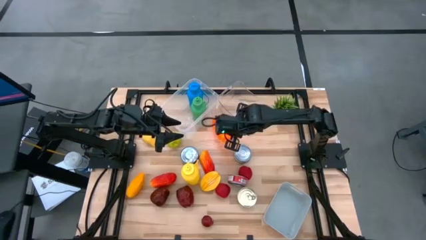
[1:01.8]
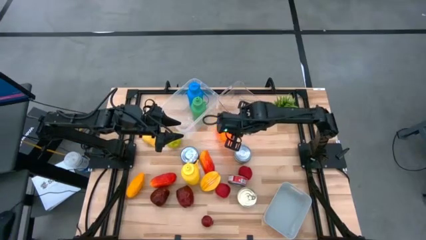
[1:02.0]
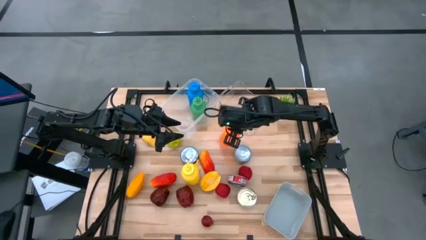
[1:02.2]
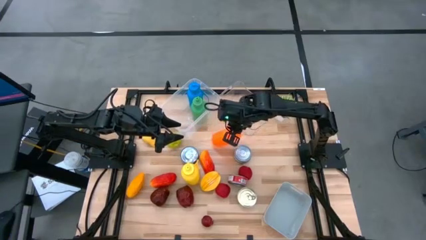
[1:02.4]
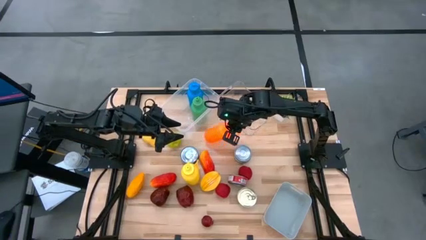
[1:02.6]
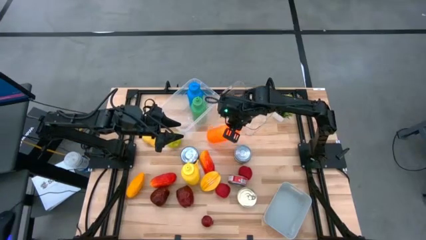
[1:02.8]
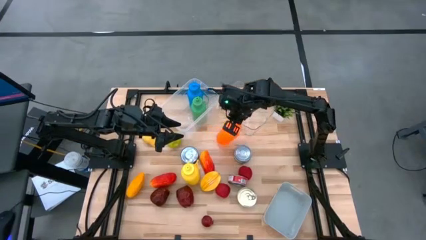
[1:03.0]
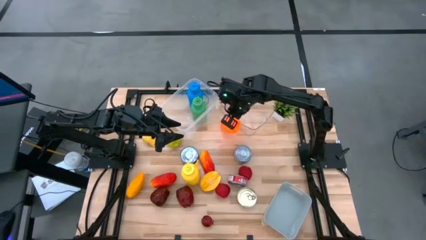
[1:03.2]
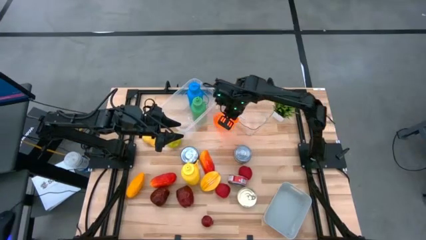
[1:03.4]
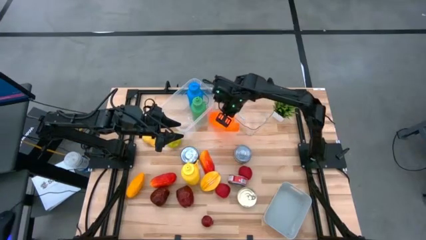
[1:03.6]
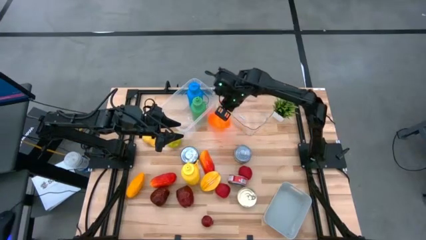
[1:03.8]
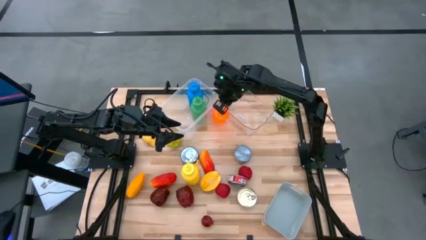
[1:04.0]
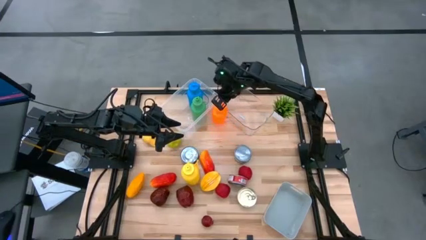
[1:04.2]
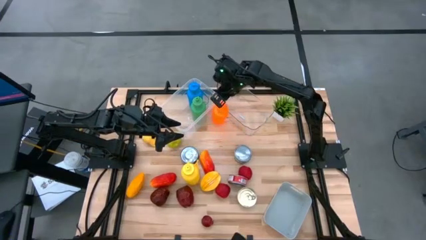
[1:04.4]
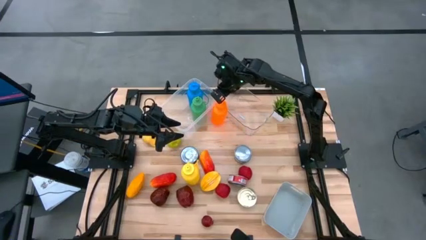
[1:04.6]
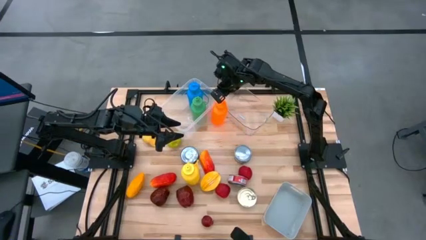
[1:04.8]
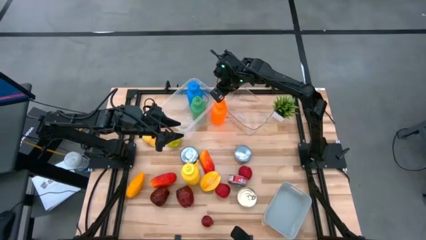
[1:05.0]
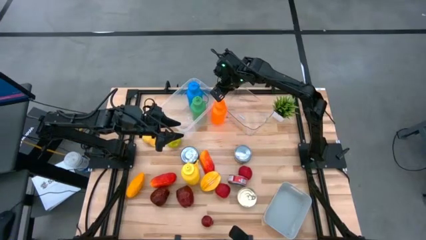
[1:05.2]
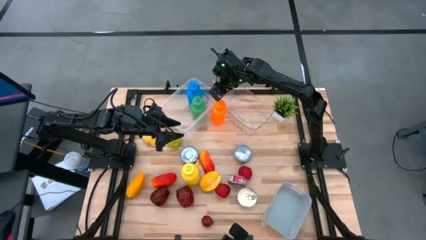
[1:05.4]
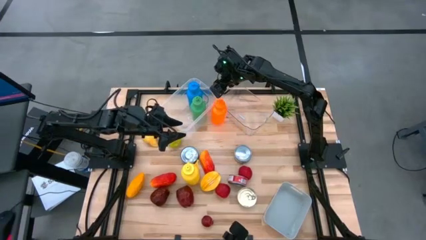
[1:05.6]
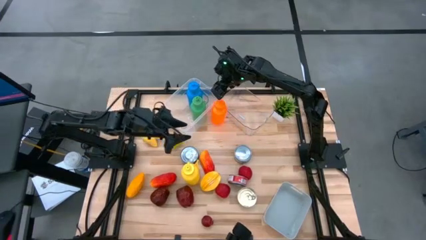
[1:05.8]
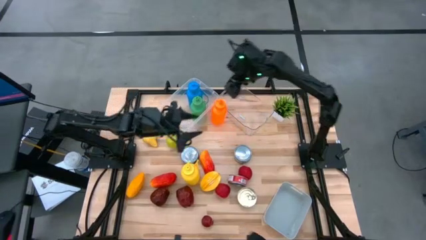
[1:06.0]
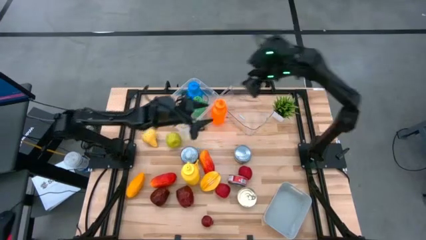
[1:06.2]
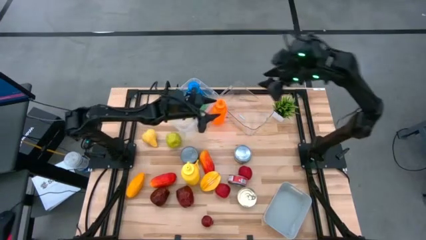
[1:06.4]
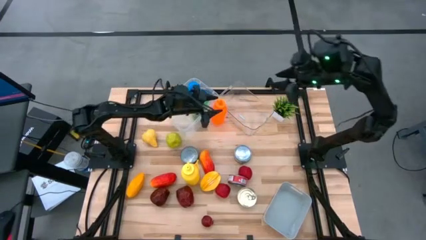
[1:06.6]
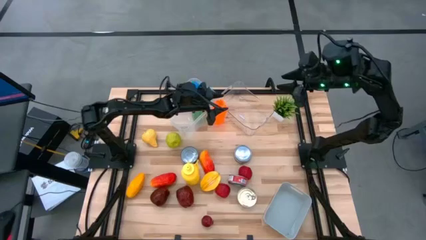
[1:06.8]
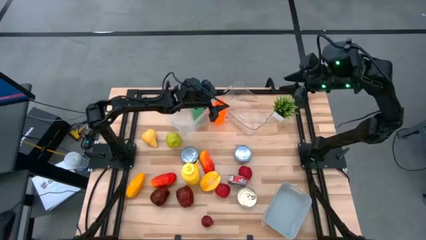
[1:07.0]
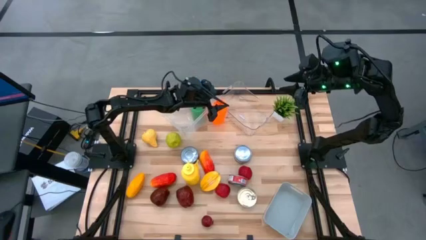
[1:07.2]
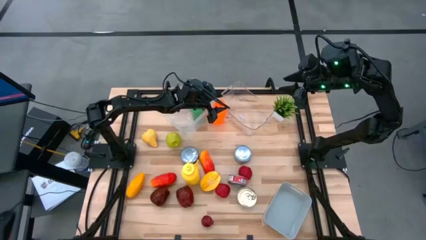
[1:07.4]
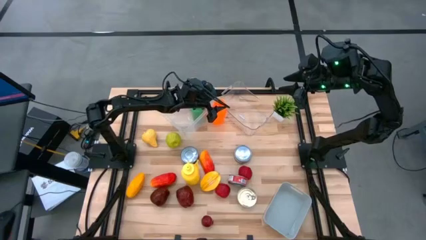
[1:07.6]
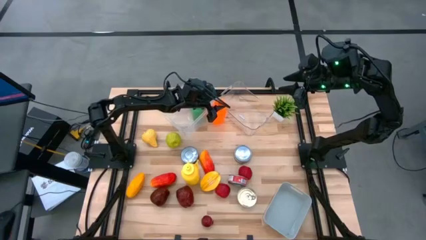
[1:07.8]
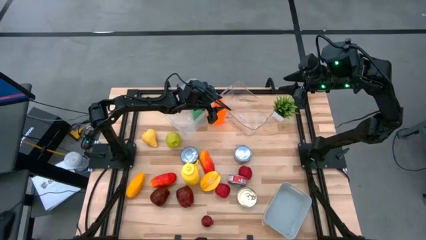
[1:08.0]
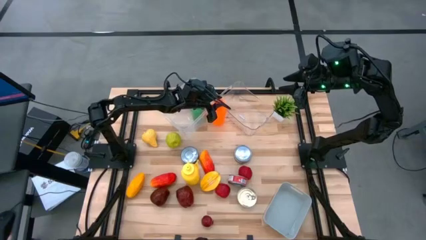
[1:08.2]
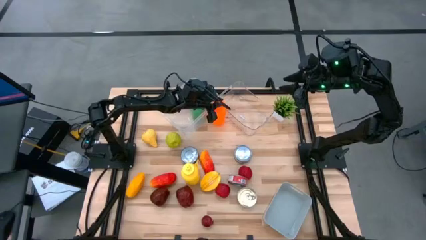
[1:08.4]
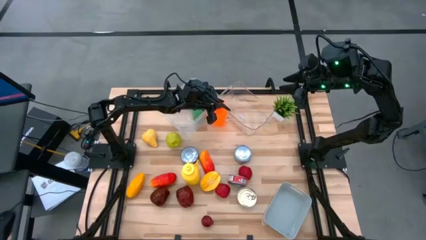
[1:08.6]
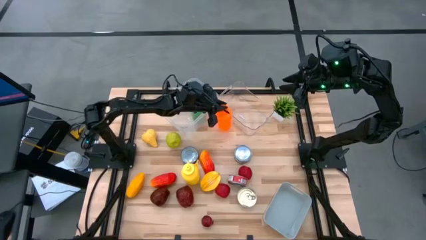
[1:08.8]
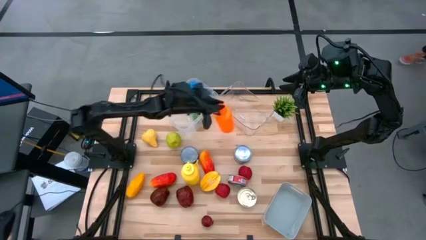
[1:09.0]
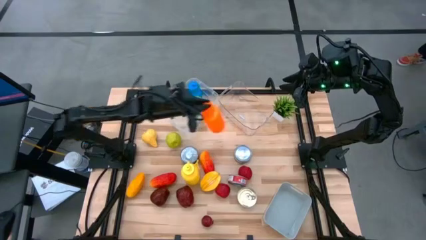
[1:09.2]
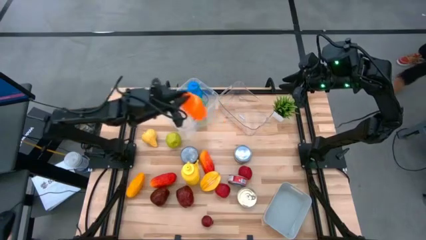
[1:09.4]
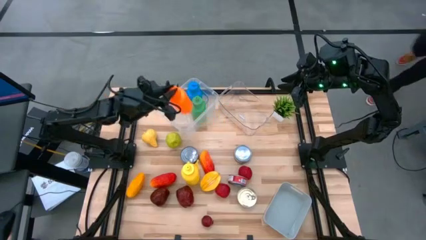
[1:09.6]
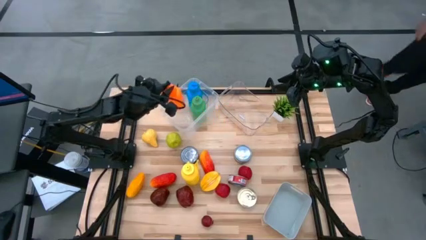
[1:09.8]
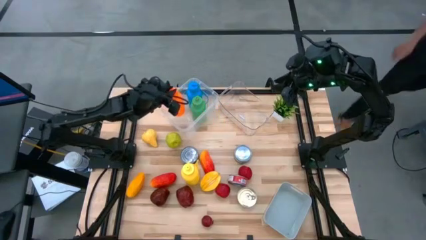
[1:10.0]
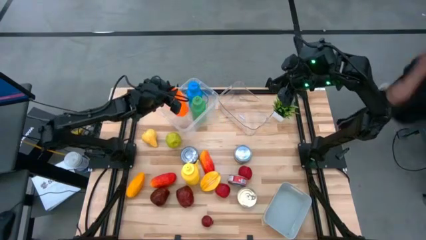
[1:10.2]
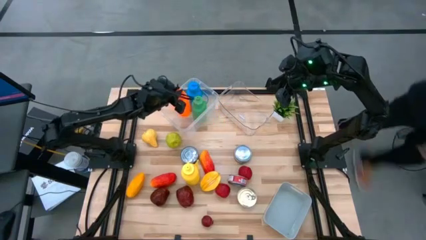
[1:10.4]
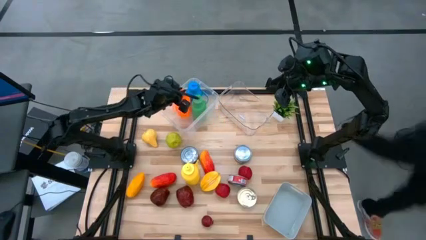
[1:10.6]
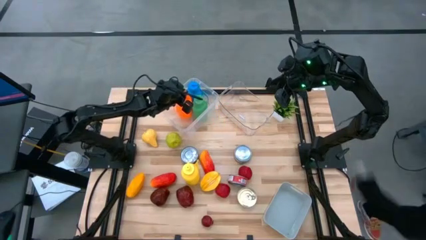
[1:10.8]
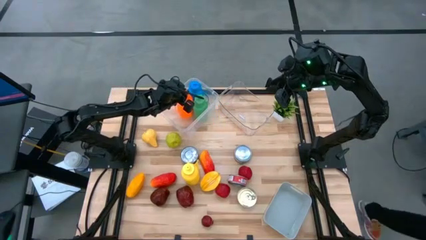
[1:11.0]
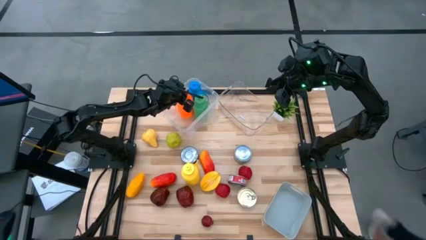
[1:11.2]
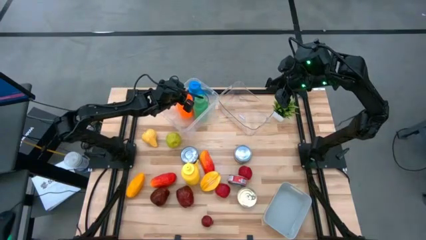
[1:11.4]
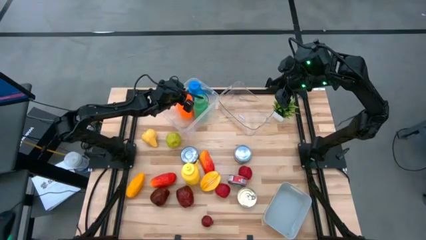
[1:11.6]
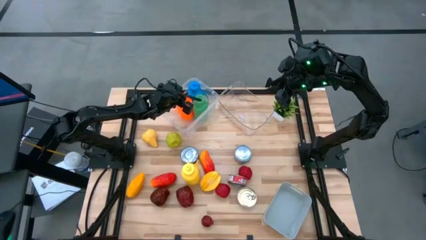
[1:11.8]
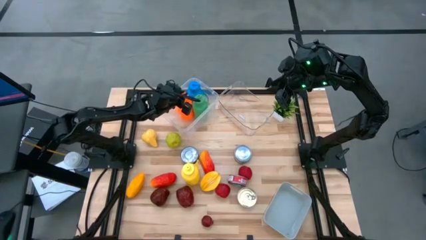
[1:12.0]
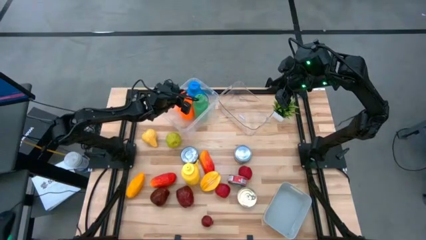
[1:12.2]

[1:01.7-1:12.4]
Task: Pick & Place Food Item
Put the orange water bottle into the left transparent bin

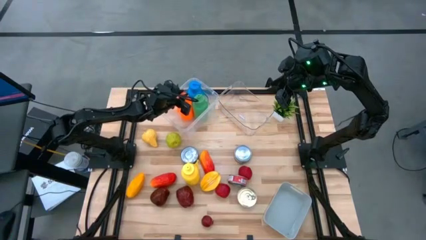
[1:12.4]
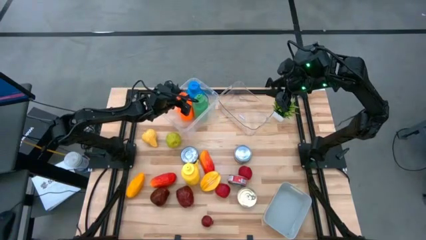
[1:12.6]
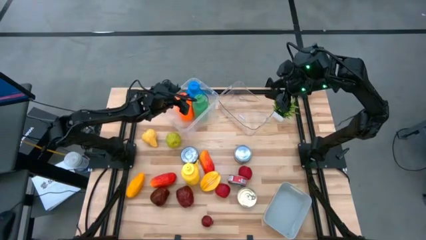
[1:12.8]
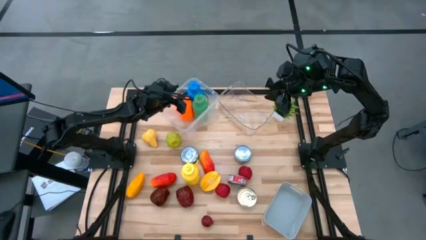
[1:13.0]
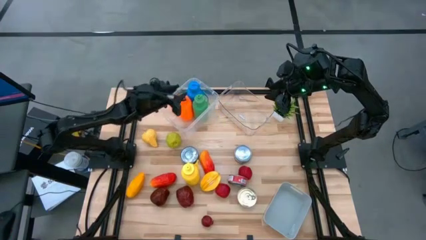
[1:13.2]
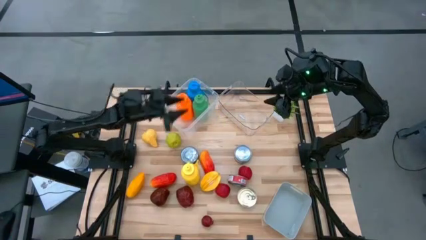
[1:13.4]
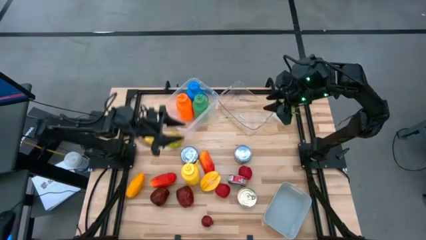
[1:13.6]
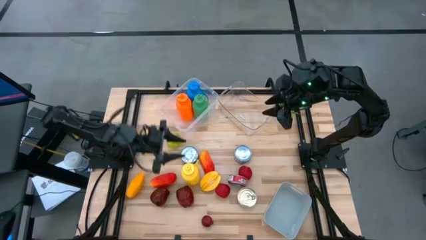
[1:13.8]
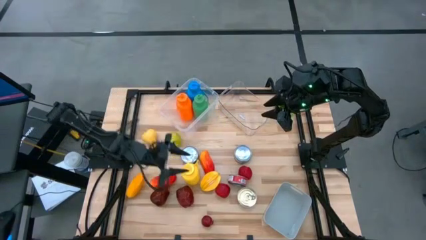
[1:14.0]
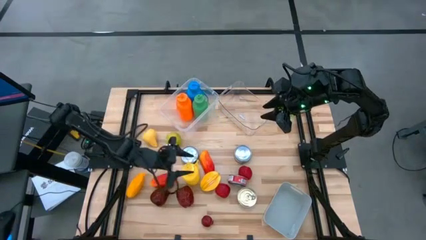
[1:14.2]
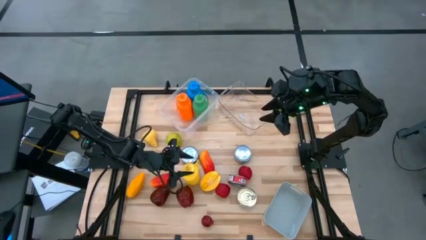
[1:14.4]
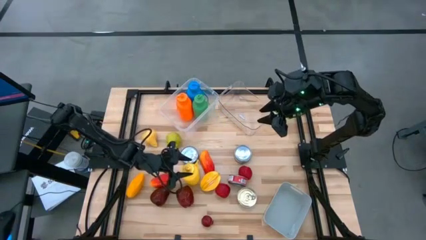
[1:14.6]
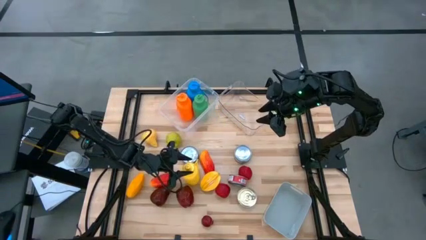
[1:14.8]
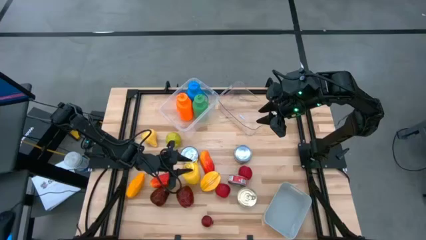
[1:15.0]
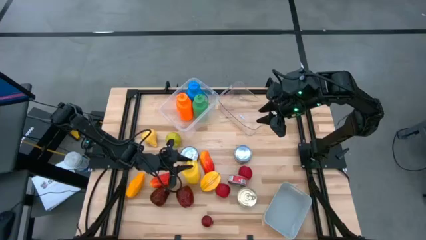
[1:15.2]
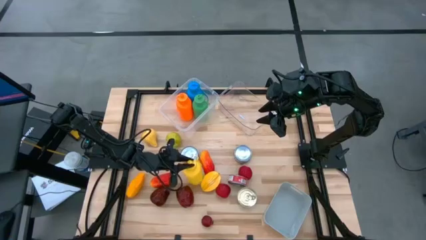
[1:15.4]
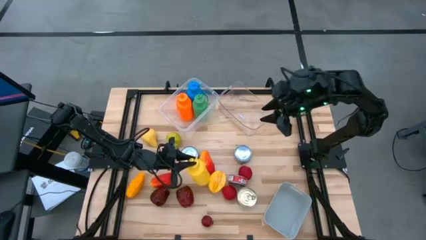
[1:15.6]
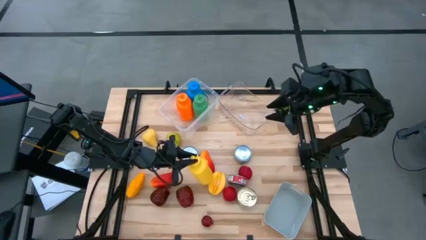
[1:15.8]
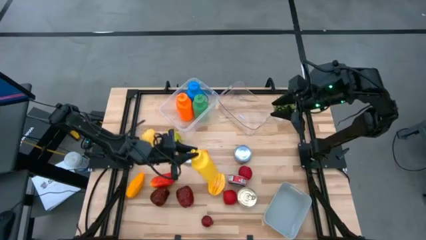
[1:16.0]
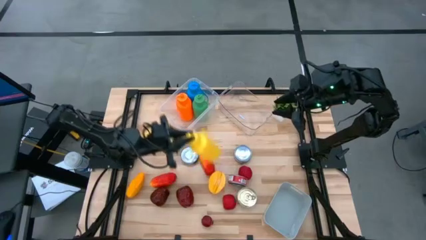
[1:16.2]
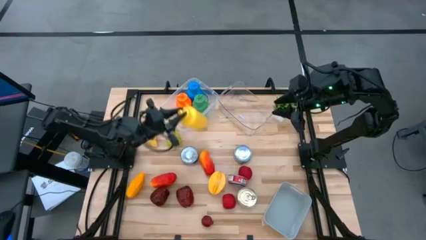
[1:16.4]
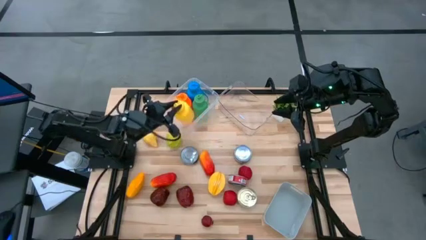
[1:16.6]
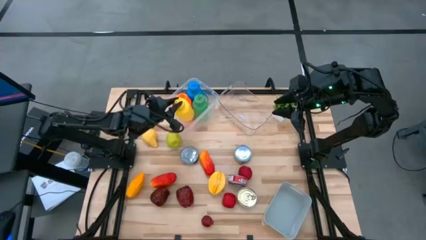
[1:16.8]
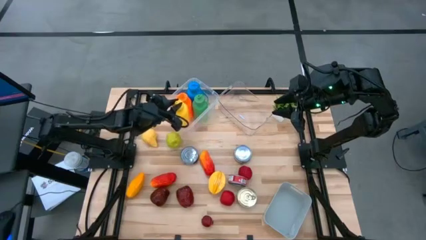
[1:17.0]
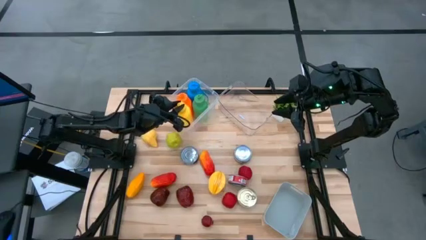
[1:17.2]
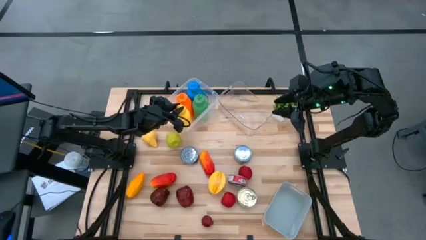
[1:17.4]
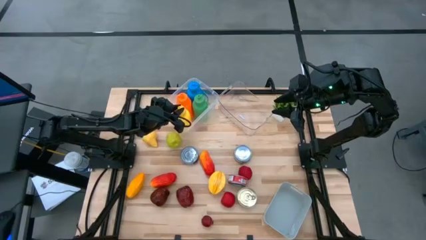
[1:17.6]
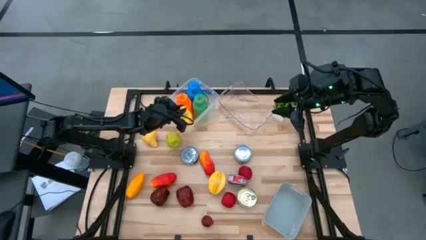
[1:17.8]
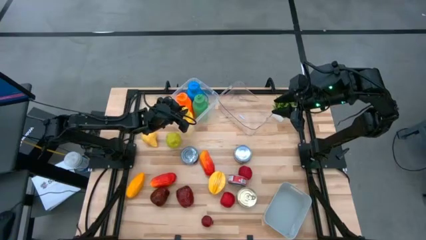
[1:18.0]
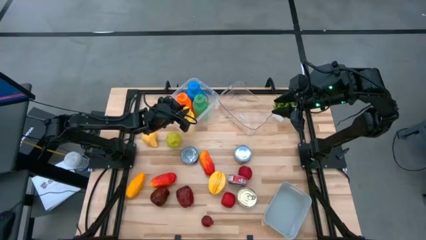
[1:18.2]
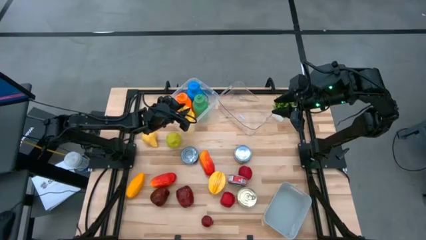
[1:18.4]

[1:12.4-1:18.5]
Put the yellow water bottle into the left transparent bin
